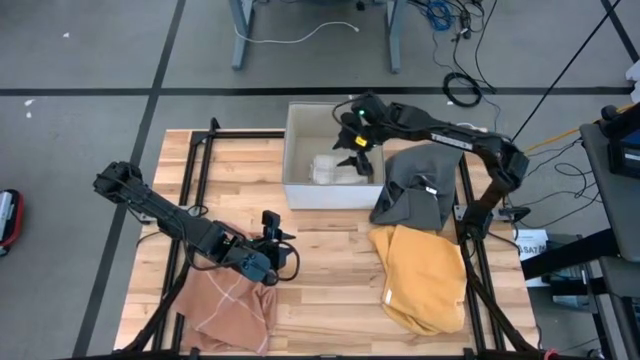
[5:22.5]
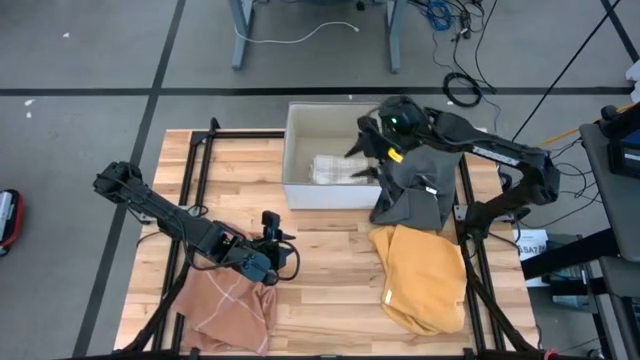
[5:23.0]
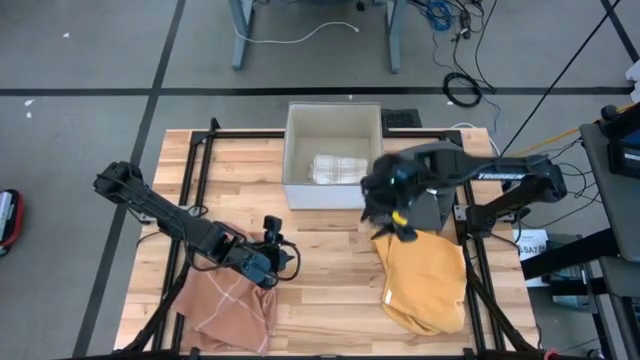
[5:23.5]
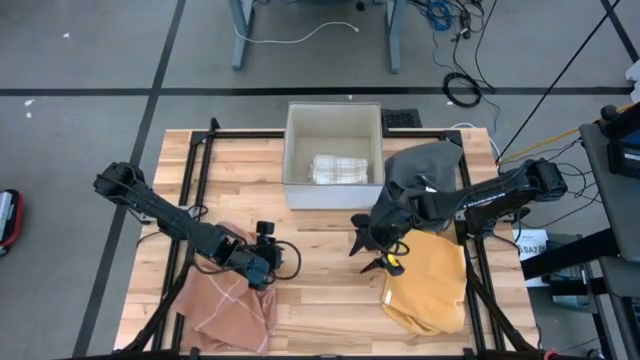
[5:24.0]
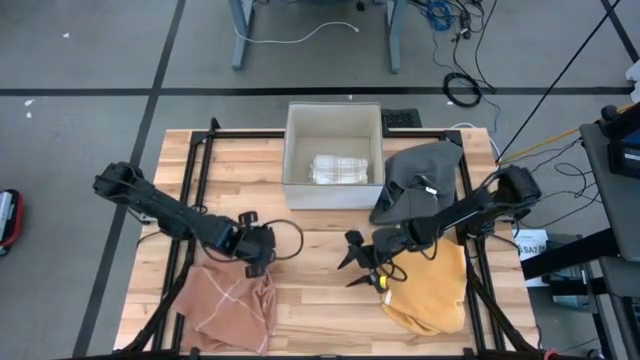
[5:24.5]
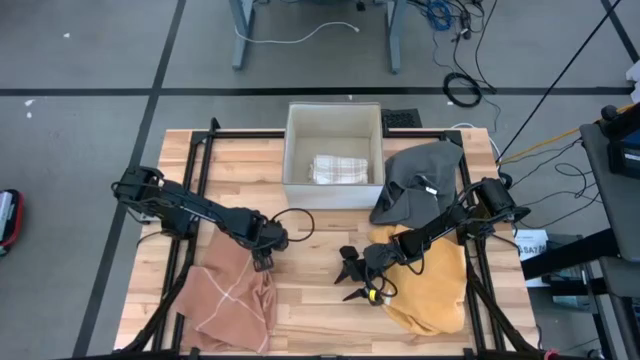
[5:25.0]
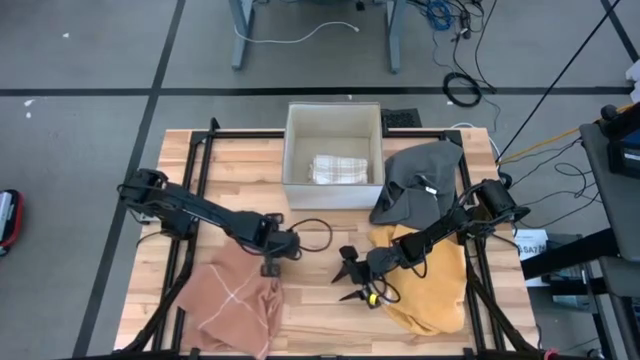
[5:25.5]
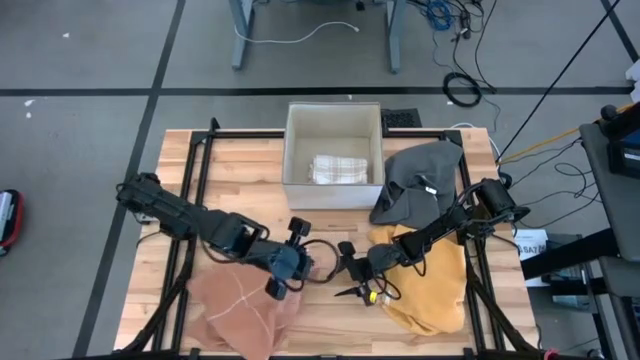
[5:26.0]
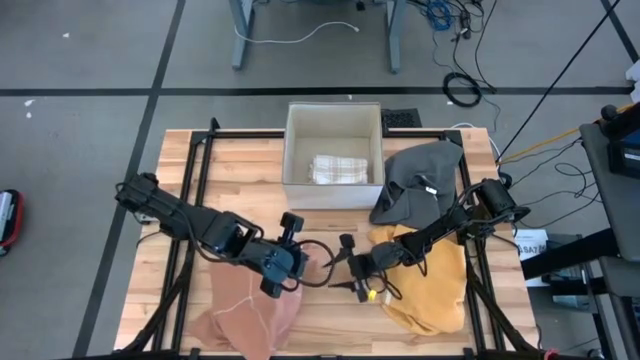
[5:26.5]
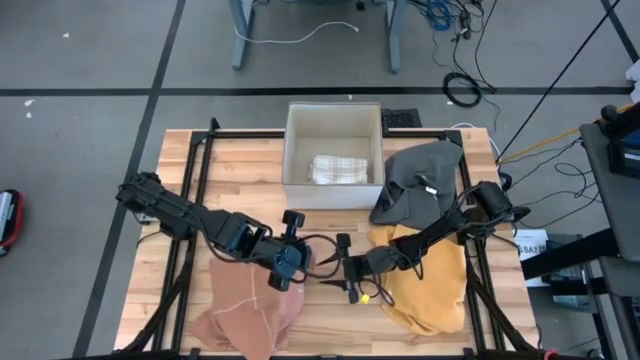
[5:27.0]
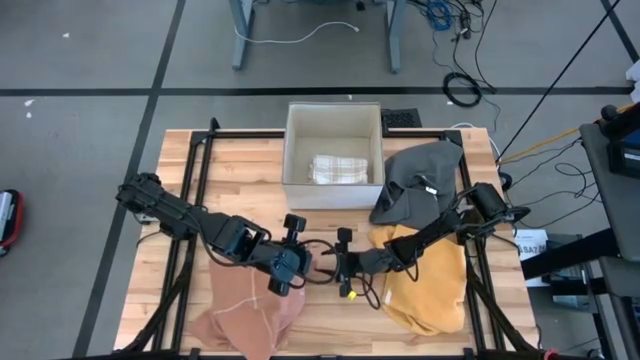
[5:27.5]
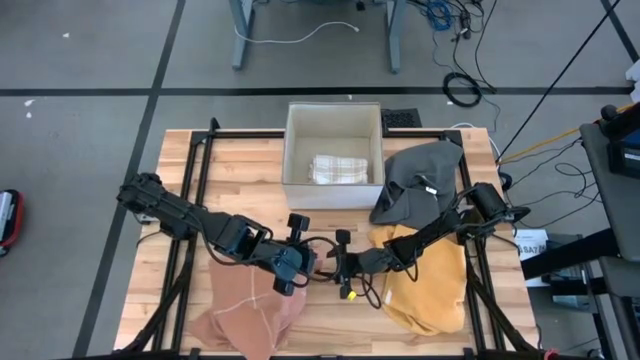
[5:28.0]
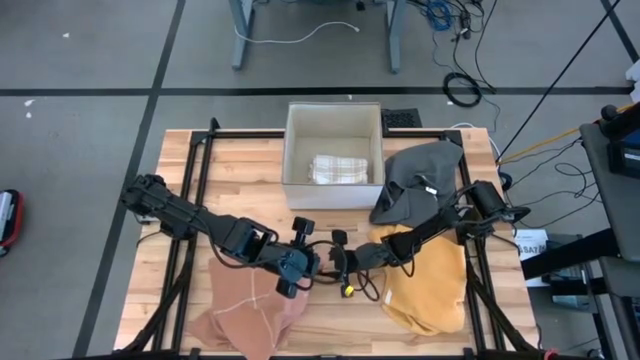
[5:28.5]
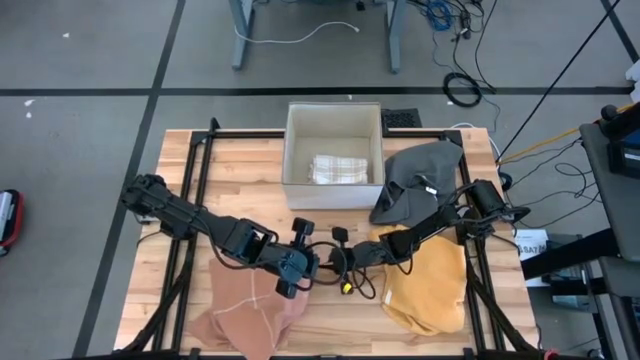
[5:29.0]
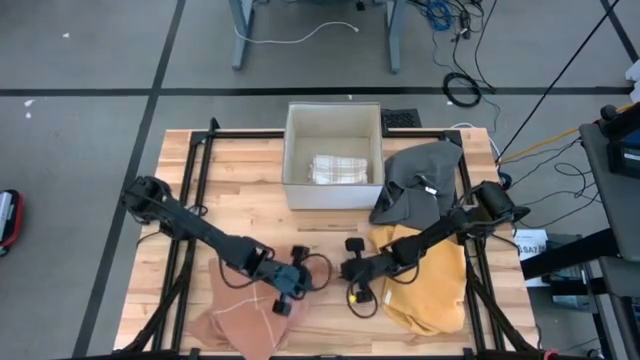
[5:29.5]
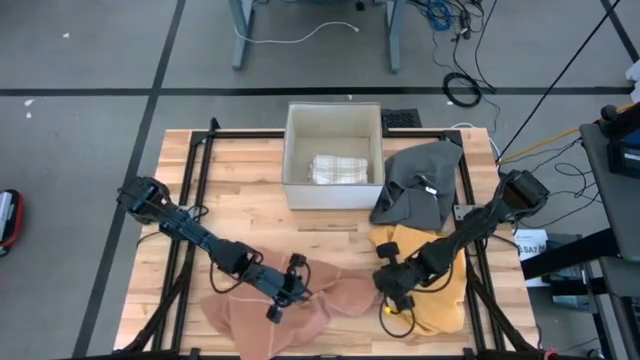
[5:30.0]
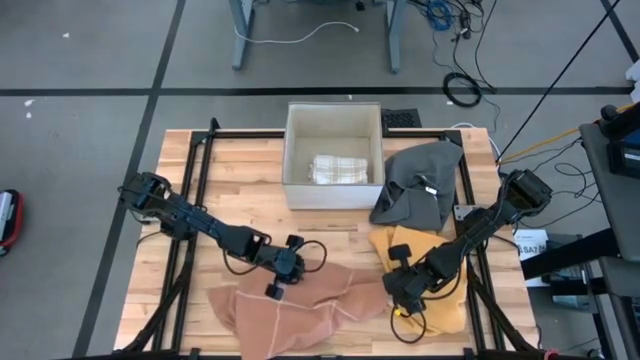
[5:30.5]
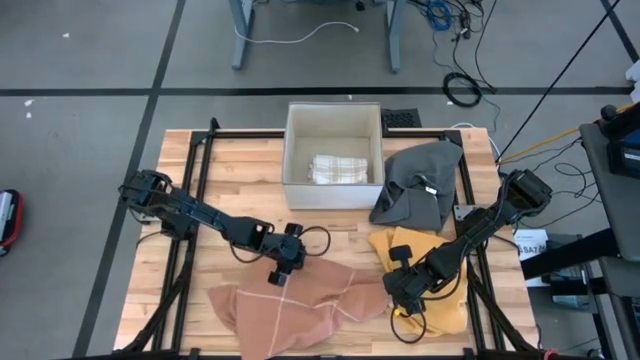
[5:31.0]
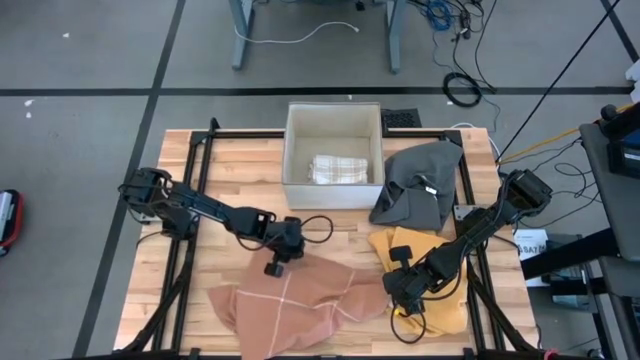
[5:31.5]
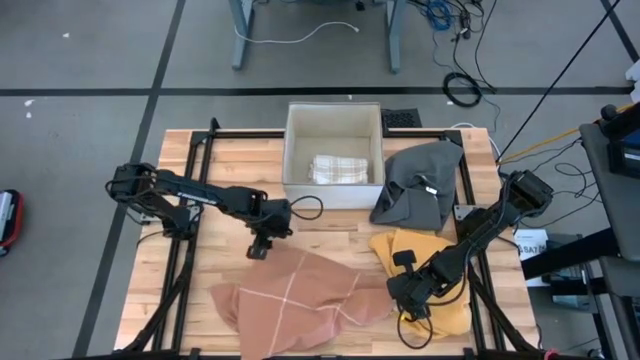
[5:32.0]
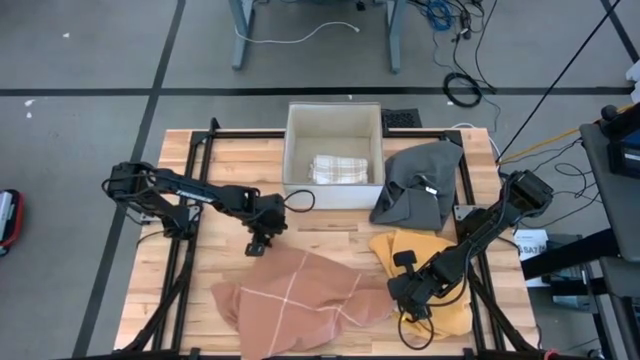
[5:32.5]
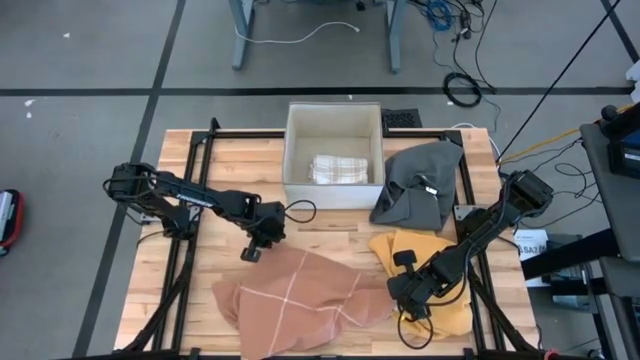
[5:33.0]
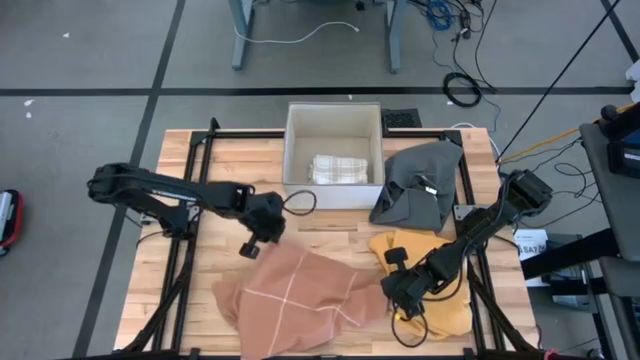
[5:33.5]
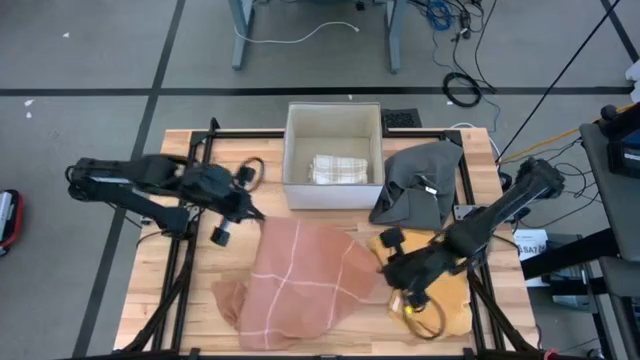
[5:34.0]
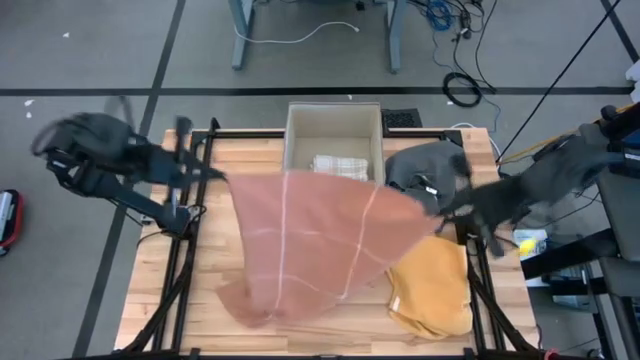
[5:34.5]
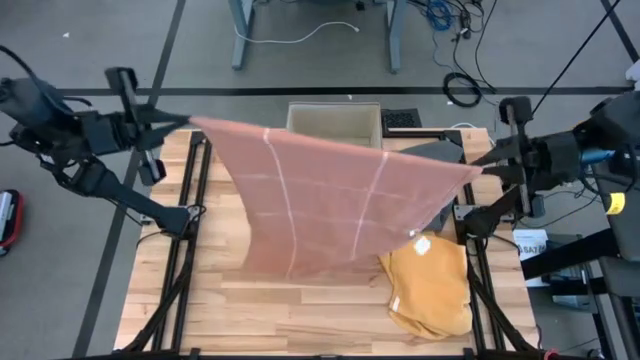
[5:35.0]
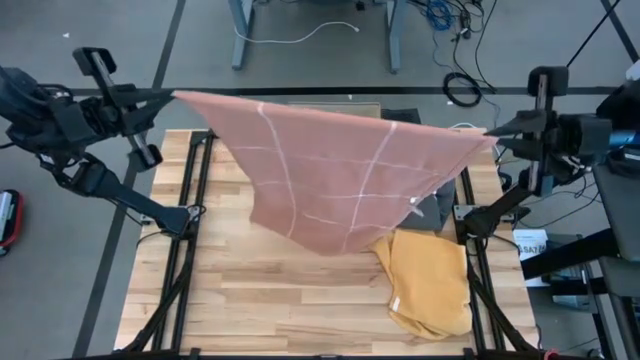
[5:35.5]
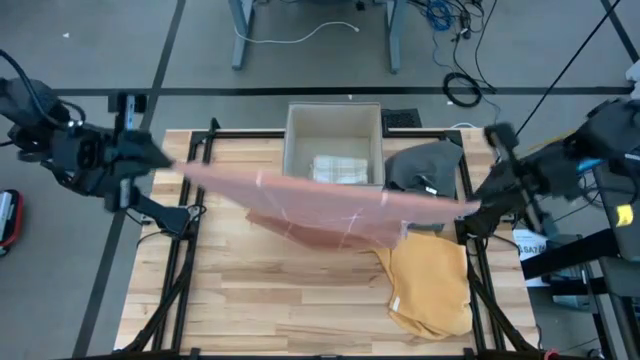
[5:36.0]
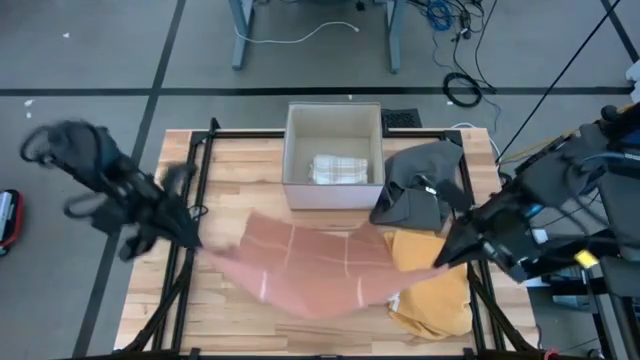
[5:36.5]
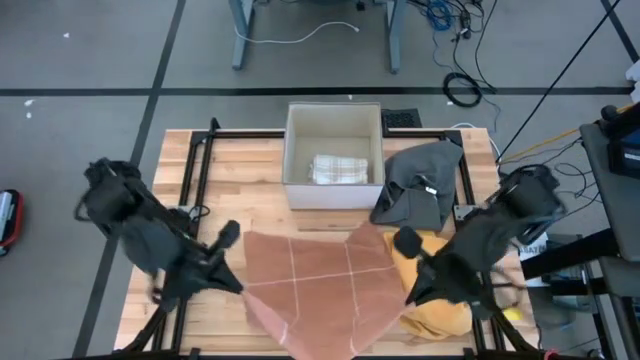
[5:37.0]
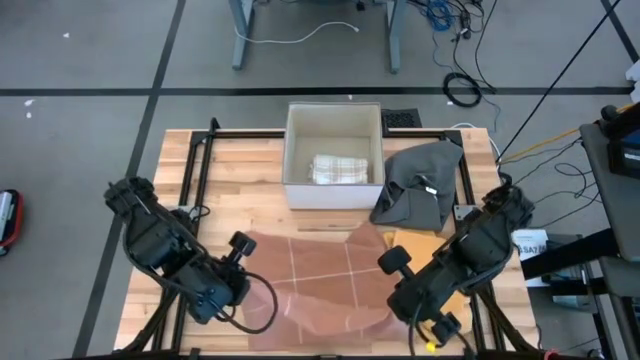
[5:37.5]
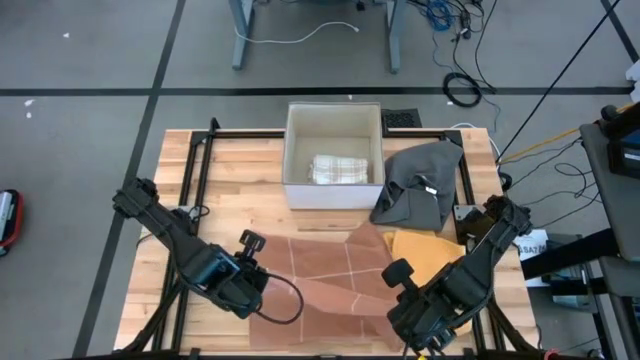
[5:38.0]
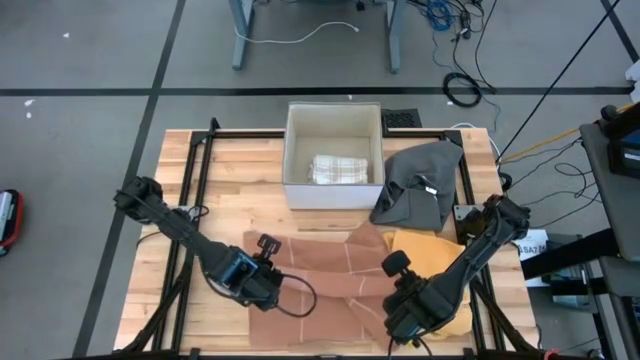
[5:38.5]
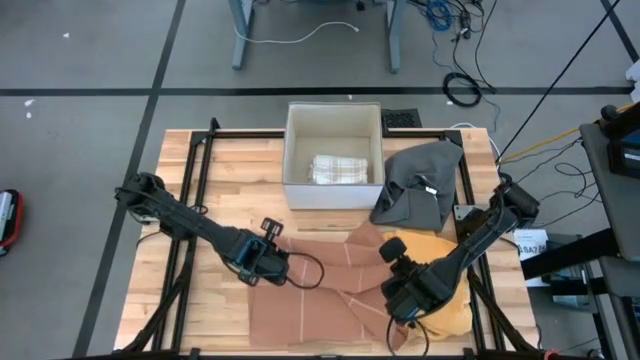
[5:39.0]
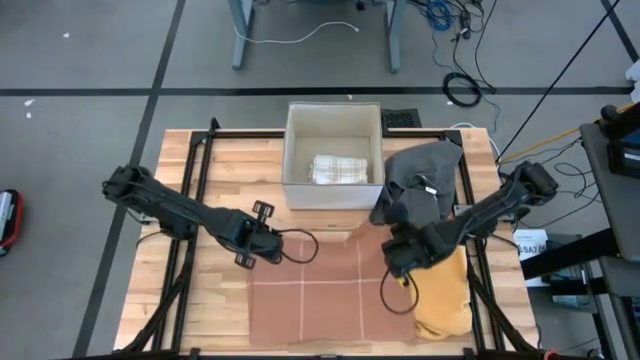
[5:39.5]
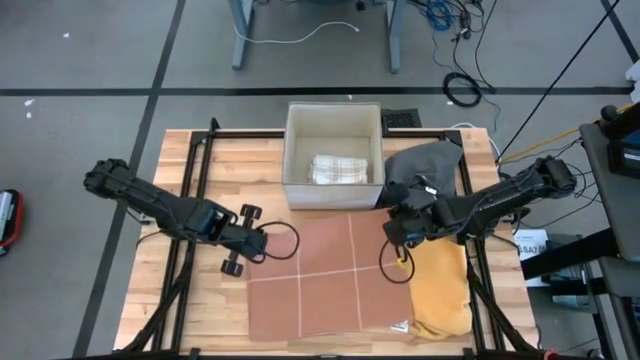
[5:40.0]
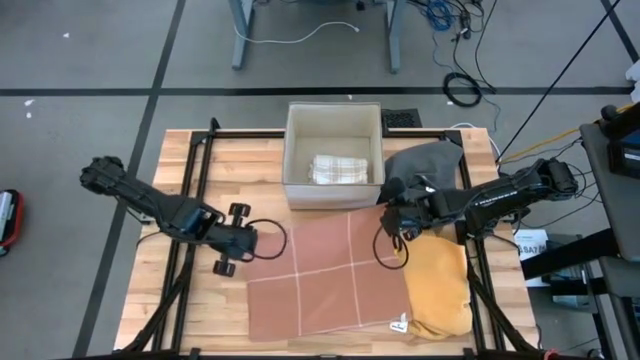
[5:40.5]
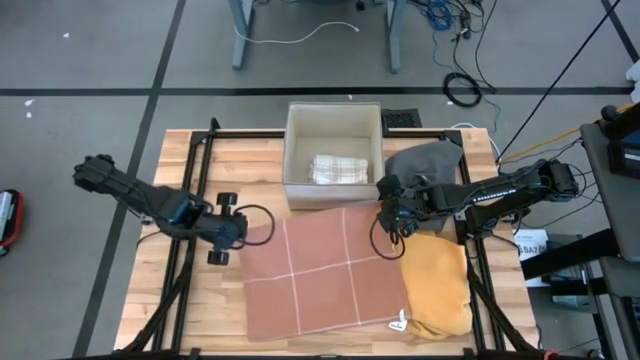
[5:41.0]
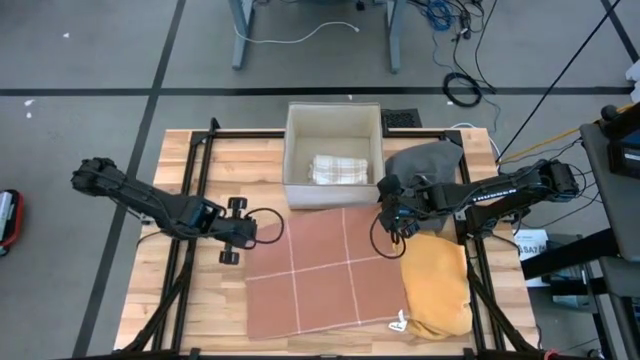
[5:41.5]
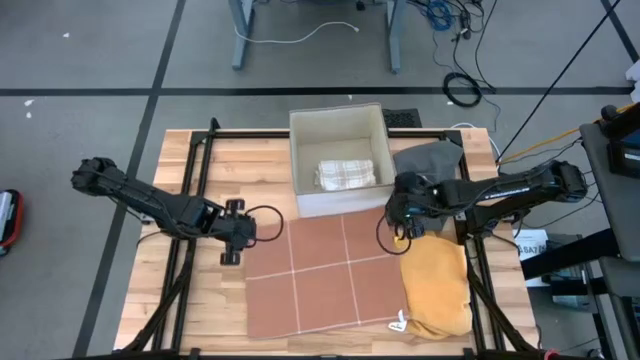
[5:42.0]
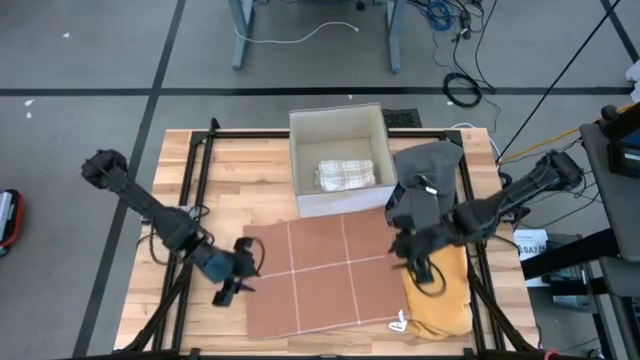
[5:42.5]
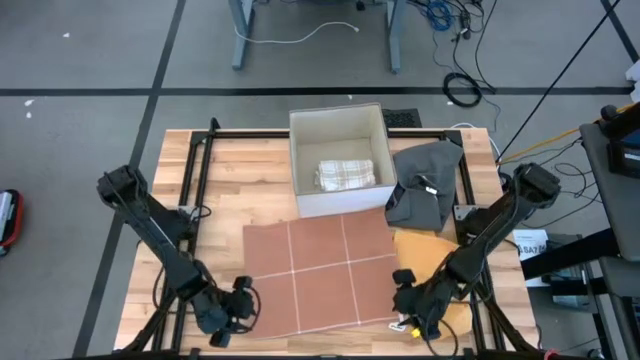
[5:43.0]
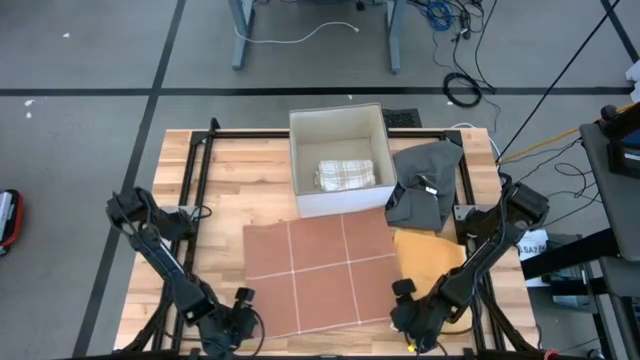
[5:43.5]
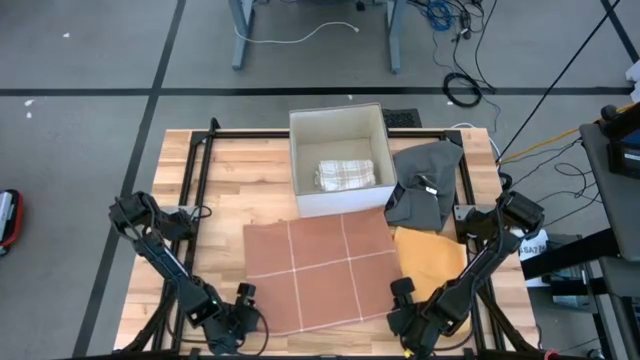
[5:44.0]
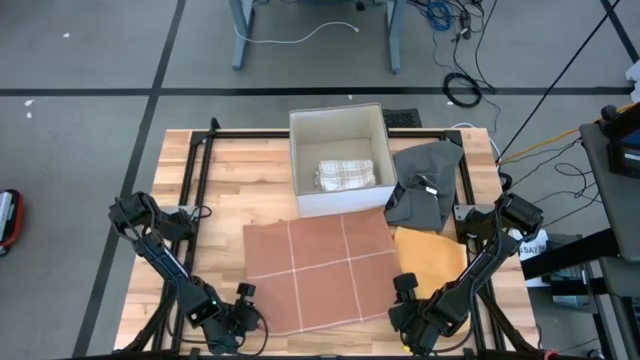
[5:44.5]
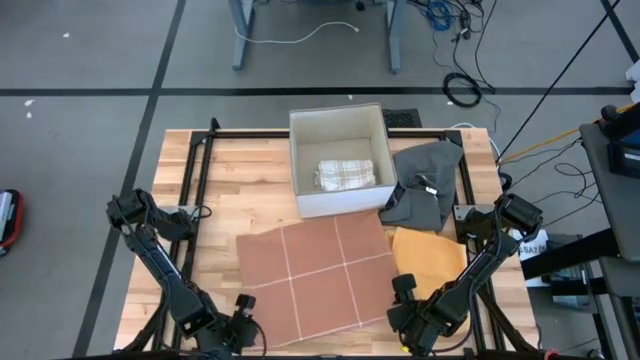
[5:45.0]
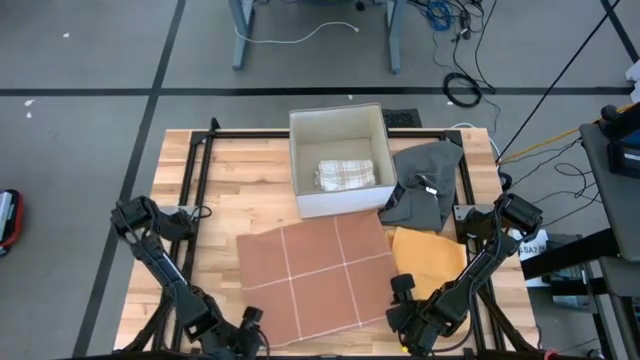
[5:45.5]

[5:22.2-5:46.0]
Task: Fold towel
Fold the light brown towel
